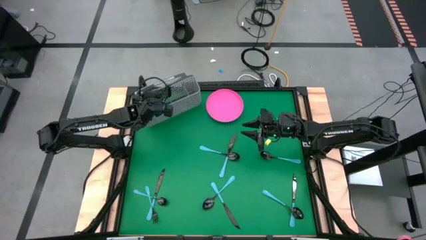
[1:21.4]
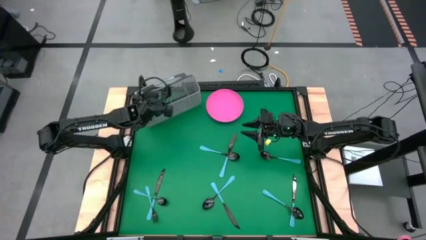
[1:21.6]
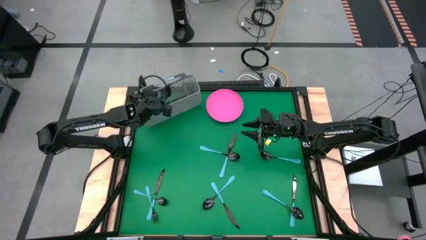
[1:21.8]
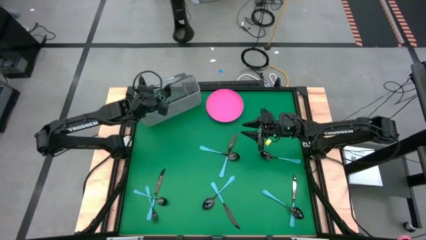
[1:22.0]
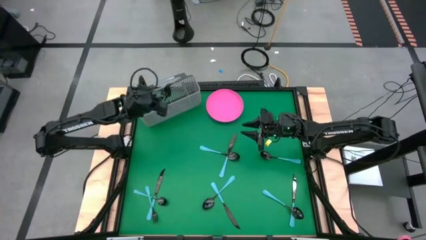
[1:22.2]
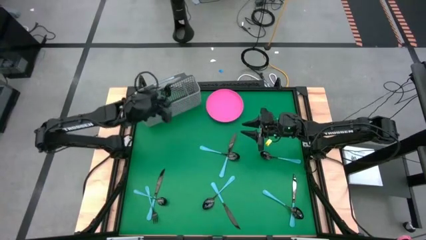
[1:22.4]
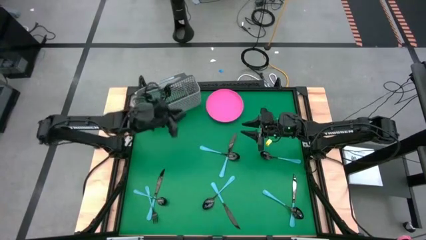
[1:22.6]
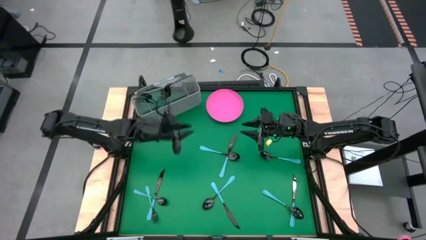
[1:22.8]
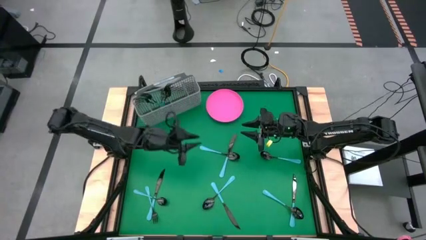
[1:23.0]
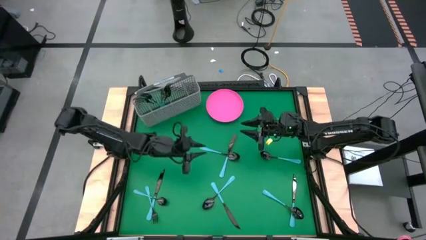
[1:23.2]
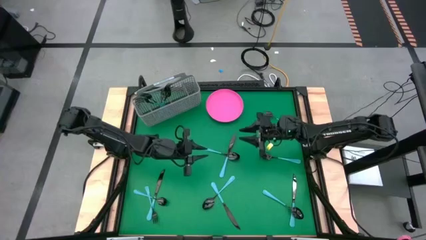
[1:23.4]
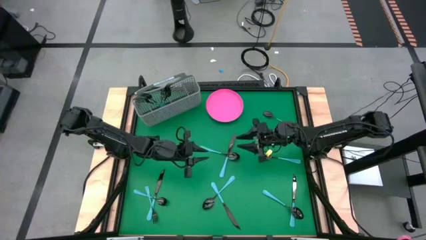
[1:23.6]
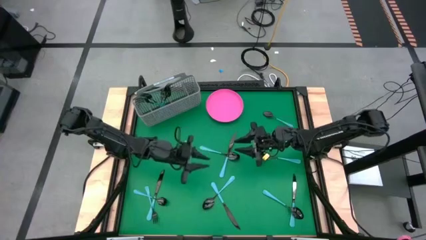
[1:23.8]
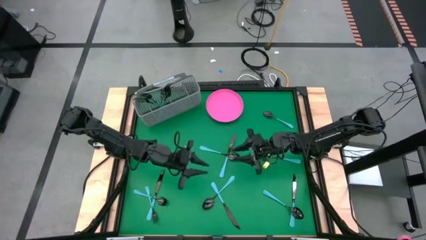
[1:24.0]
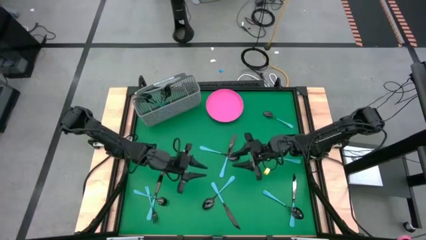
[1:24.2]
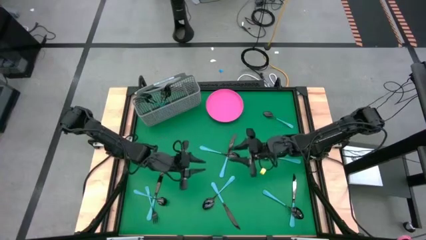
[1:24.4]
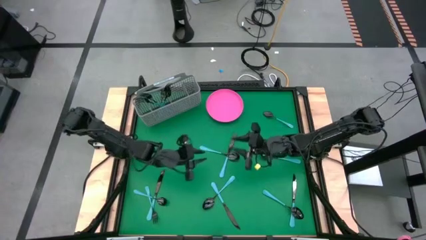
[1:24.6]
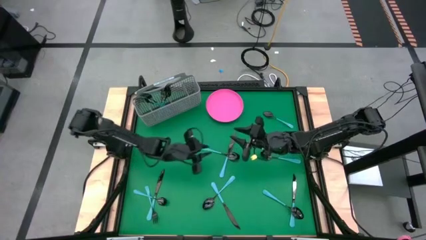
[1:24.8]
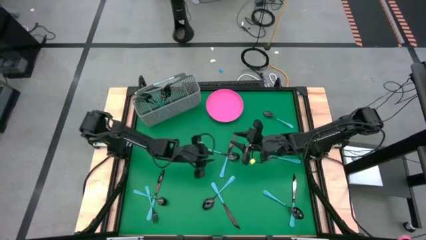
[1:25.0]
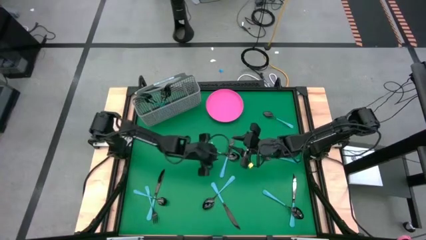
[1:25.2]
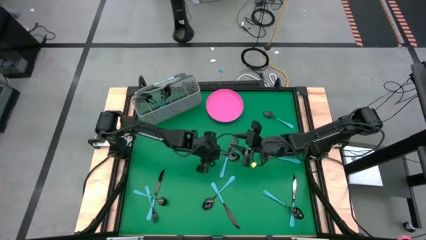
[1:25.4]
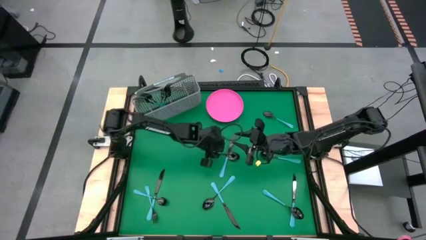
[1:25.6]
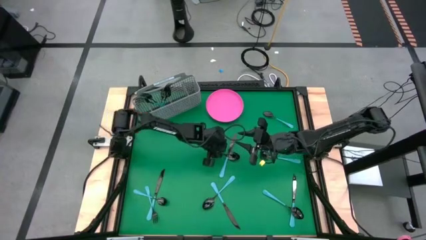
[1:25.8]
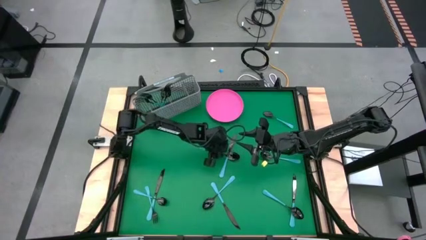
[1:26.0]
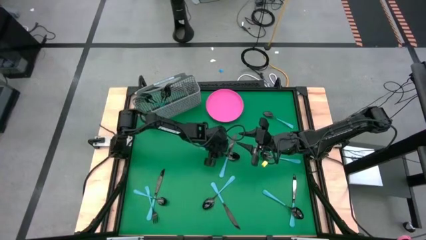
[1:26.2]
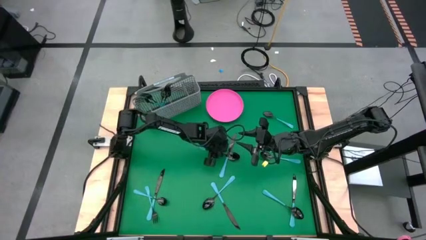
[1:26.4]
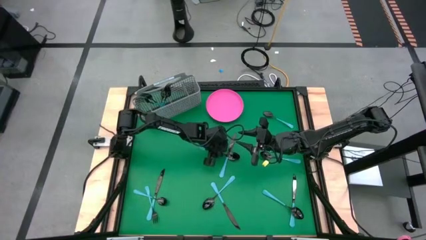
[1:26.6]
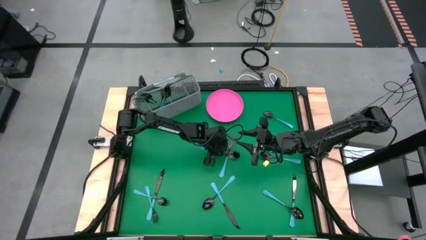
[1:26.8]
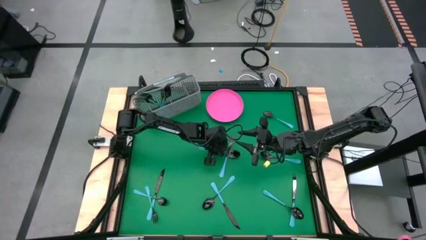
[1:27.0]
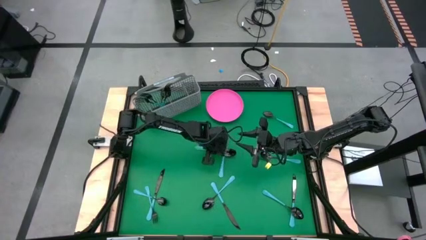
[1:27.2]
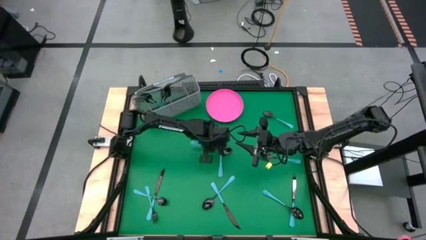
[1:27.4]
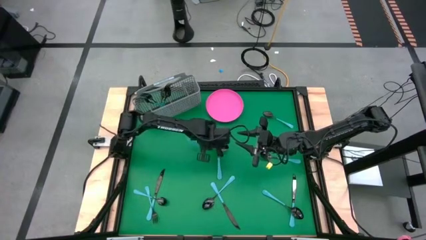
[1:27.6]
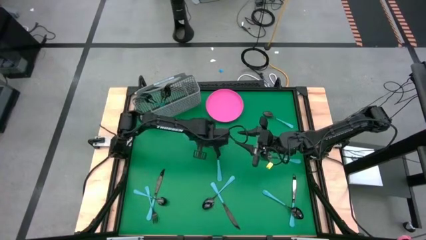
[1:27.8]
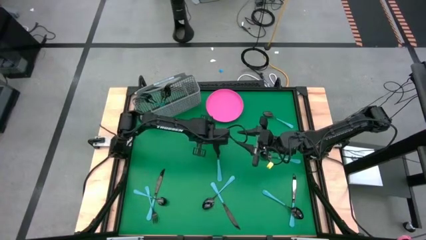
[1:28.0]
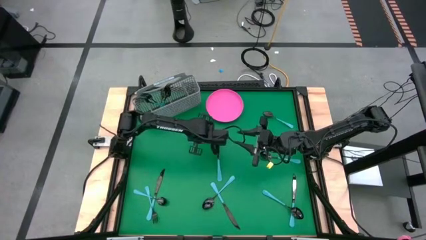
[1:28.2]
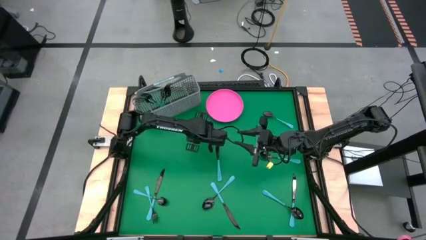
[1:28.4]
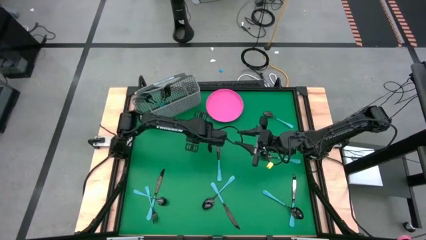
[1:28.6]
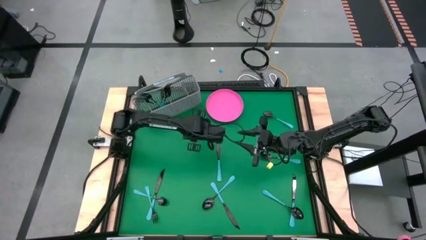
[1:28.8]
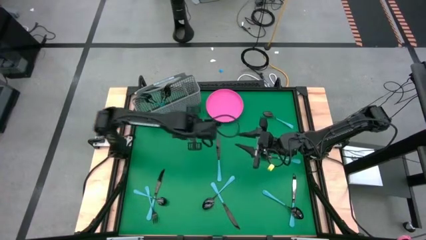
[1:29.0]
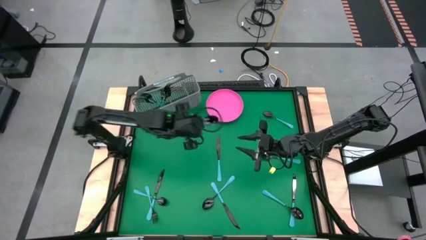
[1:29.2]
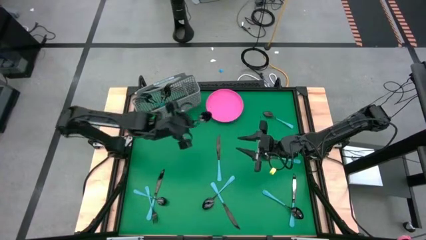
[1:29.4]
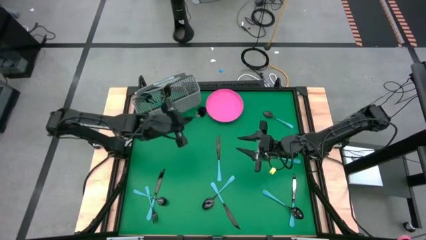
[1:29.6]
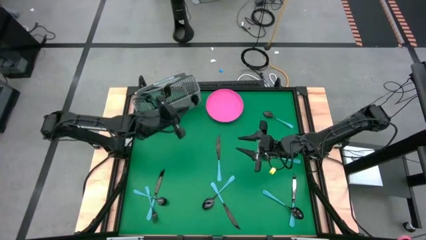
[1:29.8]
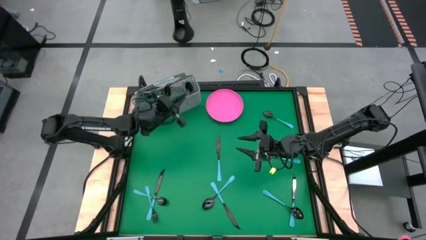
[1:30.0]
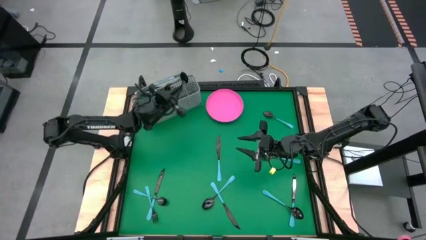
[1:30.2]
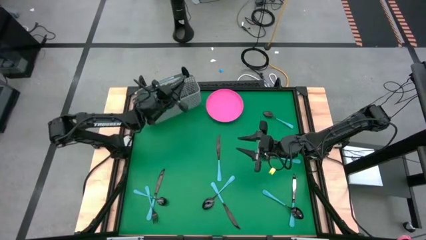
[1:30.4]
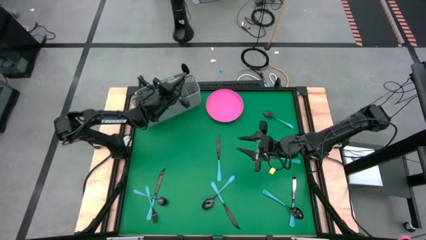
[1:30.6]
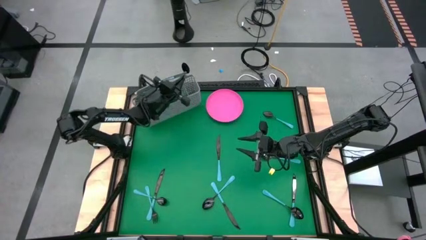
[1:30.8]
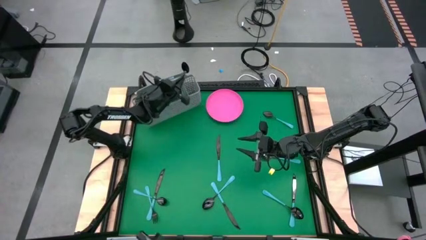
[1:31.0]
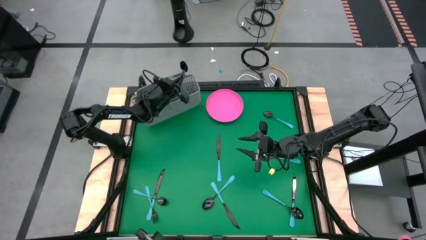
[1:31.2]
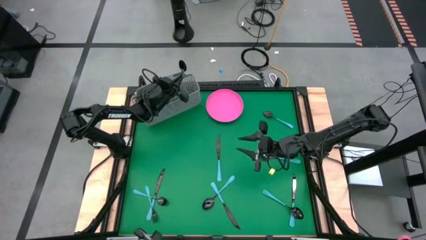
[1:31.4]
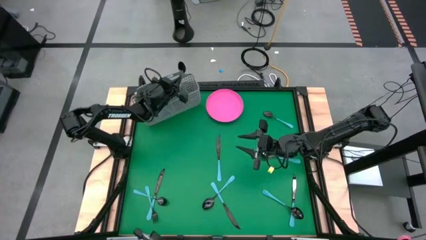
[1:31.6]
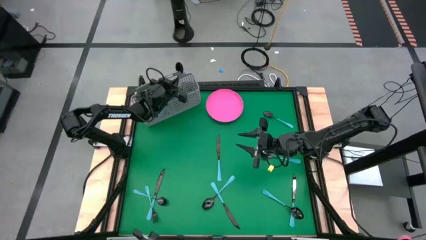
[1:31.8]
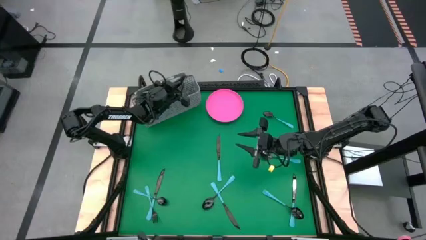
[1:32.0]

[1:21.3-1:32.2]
Task: Sort silverware
Put the blue spoon into the gray silverware holder

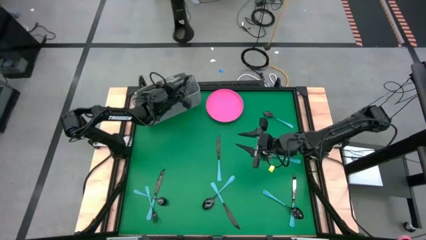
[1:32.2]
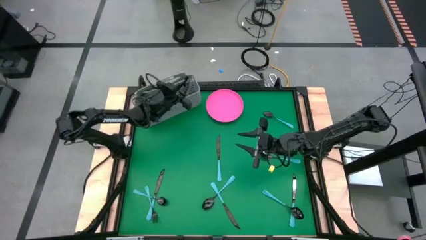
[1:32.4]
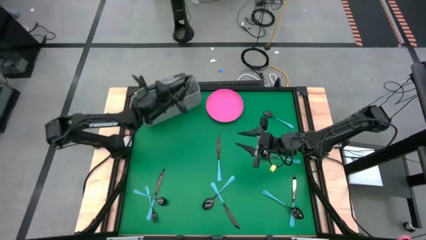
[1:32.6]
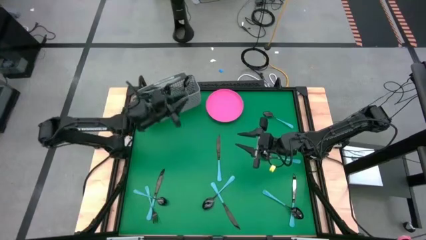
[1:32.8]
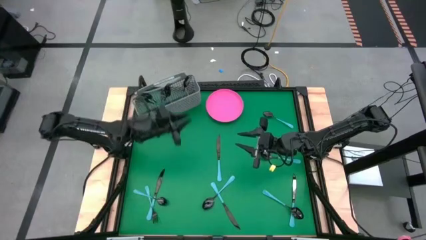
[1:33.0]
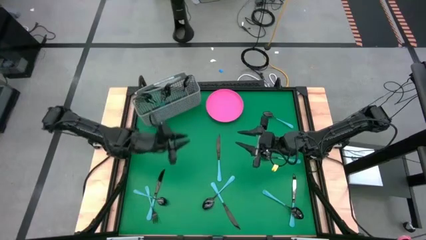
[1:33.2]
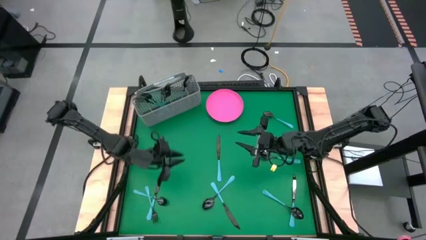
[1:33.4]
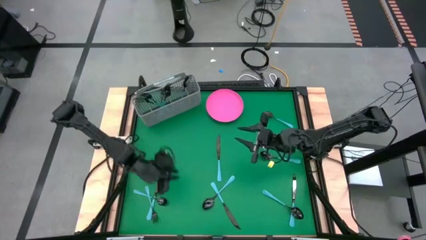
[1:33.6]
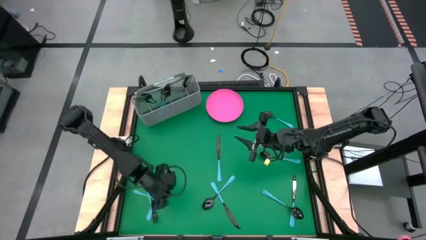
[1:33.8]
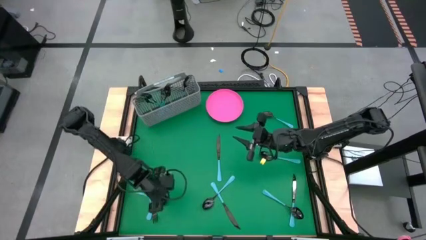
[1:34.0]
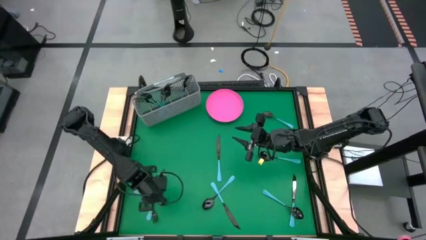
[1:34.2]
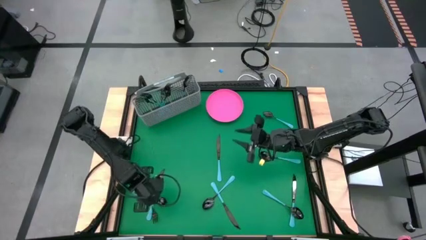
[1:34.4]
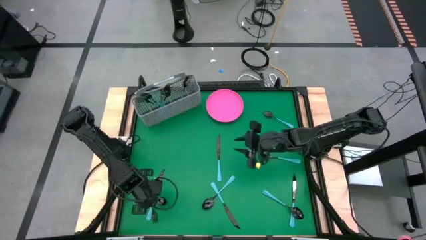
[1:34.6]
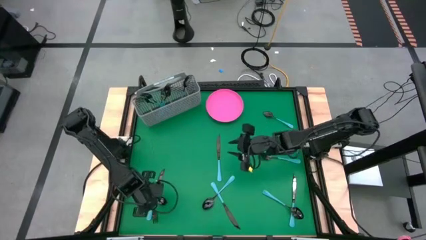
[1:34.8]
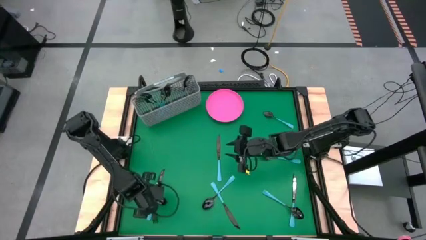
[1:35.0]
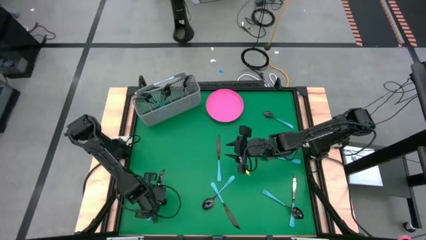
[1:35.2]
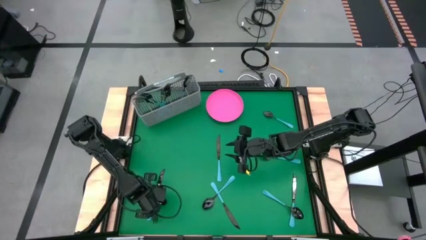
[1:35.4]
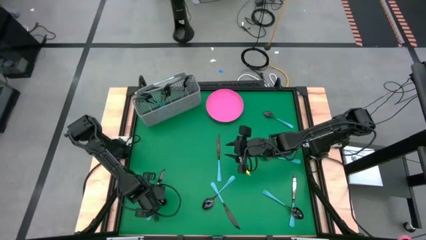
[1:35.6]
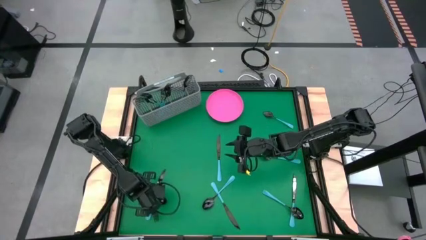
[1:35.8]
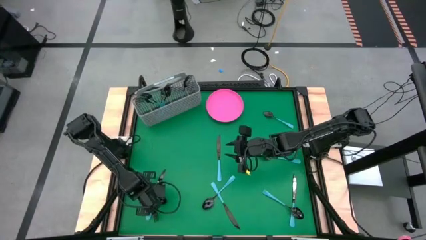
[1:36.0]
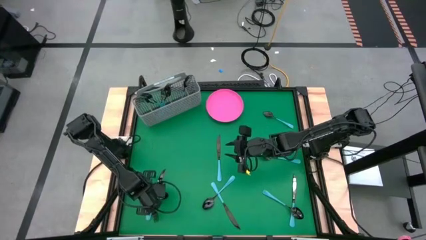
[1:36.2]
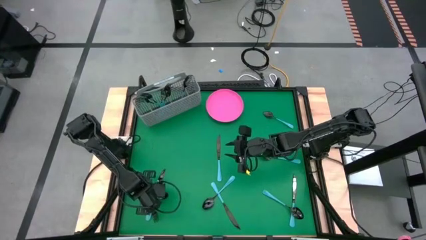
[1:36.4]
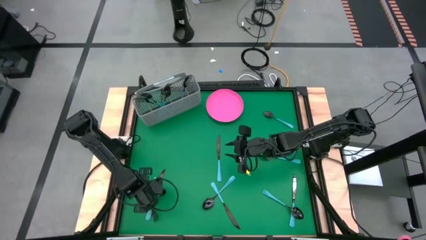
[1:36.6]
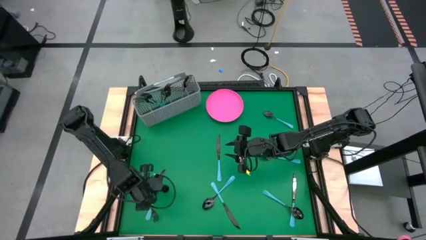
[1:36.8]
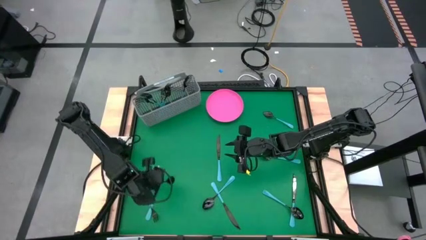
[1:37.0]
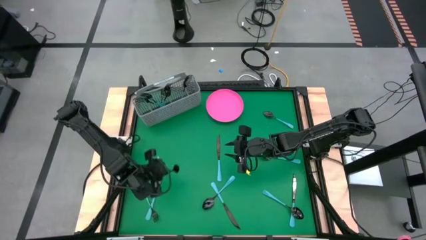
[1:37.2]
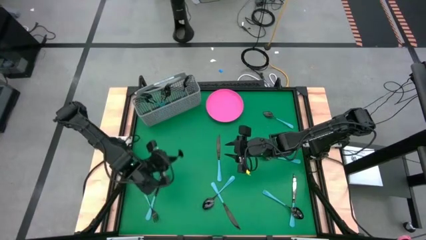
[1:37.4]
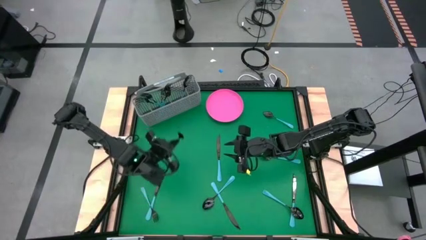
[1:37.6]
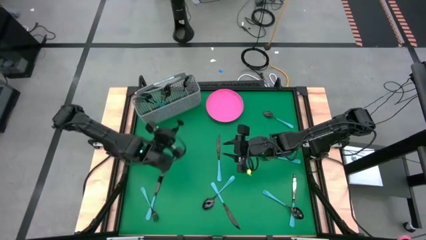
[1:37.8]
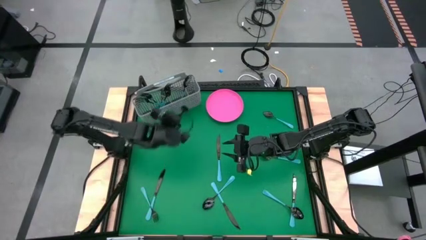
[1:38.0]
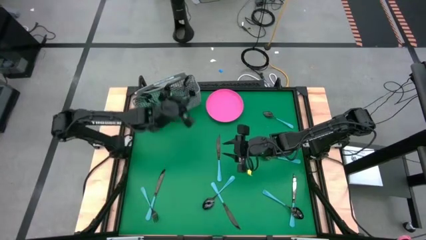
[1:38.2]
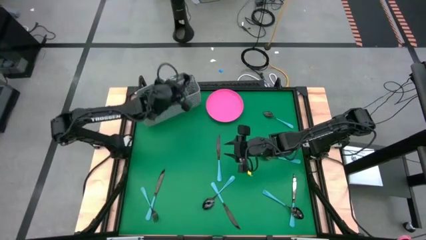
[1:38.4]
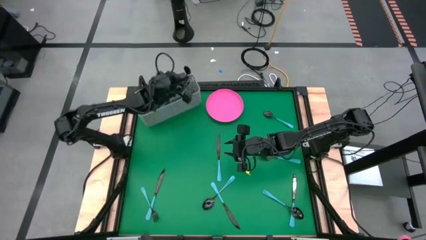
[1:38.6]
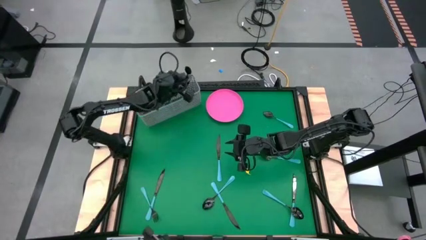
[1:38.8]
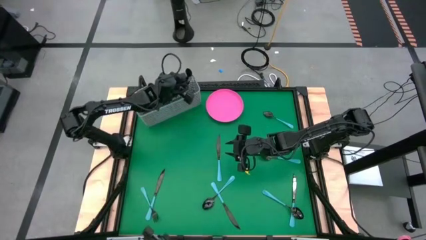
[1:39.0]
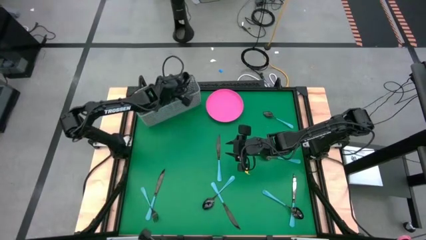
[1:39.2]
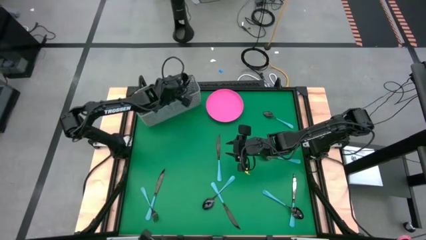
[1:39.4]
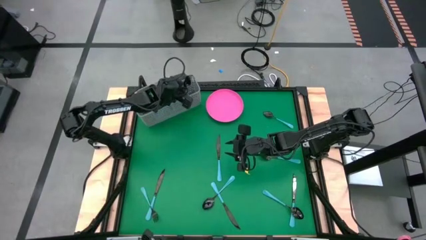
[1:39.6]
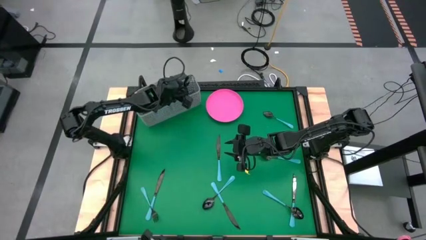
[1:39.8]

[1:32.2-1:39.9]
Put the blue spoon into the gray silverware holder
